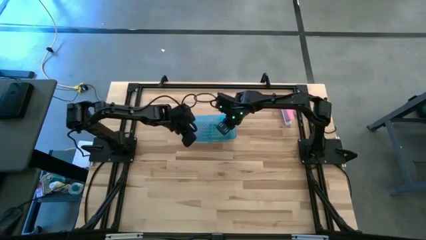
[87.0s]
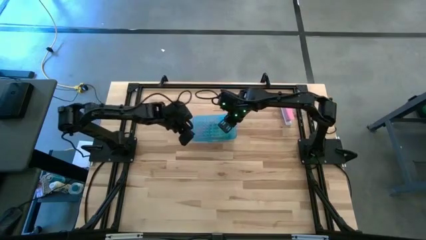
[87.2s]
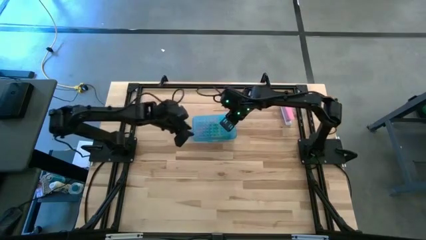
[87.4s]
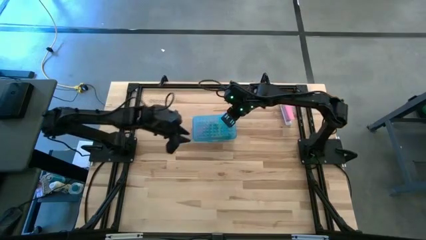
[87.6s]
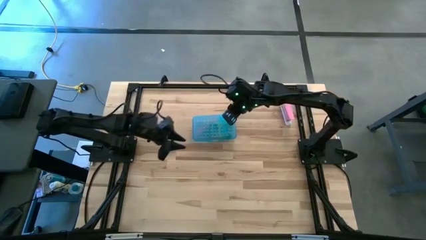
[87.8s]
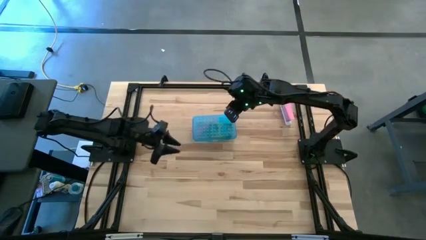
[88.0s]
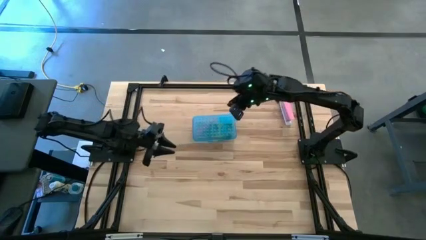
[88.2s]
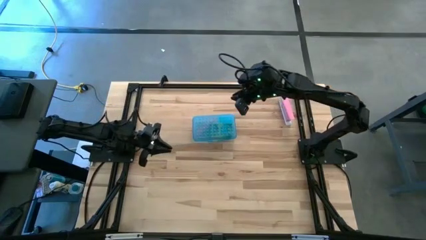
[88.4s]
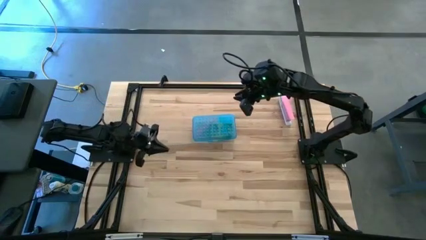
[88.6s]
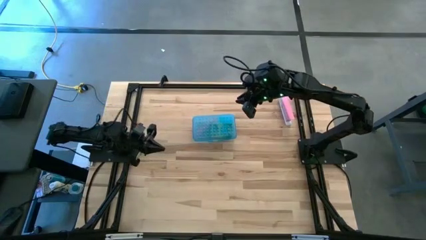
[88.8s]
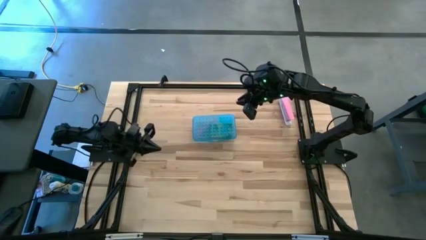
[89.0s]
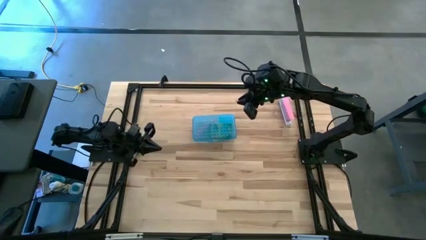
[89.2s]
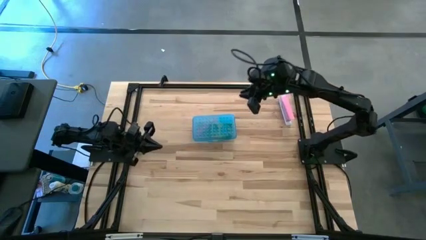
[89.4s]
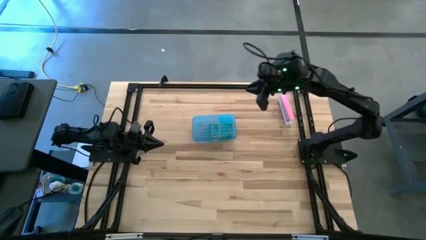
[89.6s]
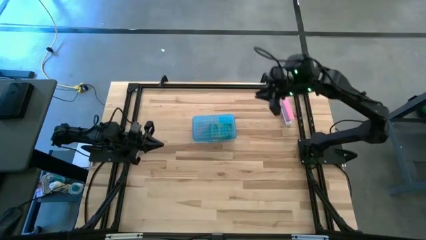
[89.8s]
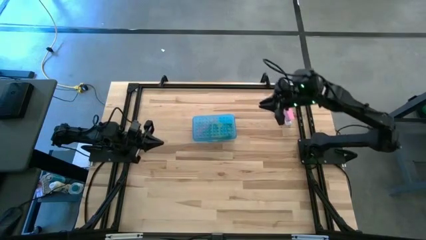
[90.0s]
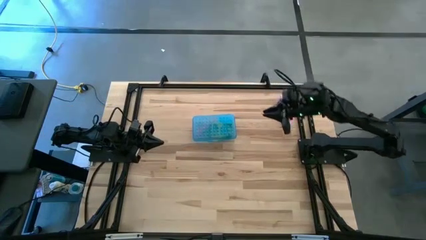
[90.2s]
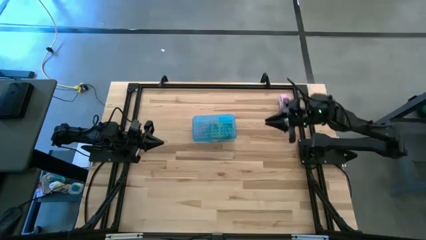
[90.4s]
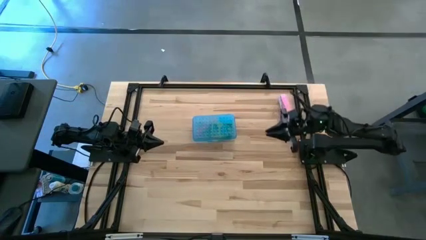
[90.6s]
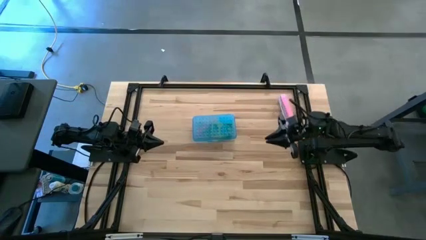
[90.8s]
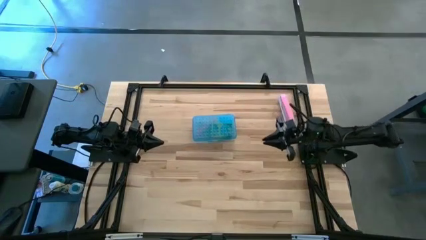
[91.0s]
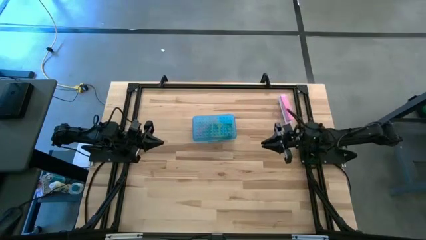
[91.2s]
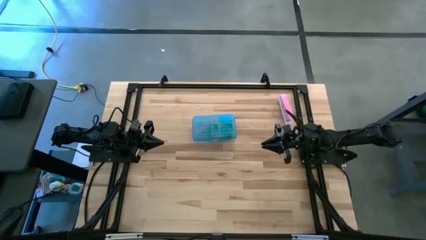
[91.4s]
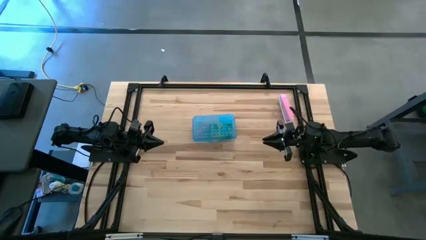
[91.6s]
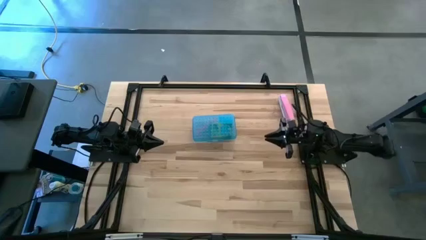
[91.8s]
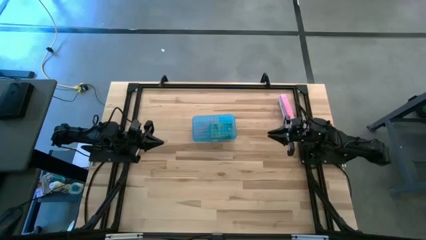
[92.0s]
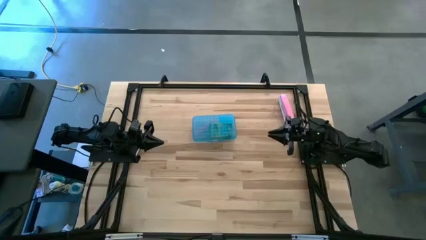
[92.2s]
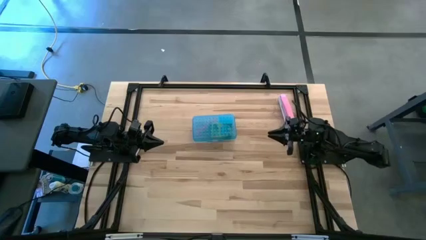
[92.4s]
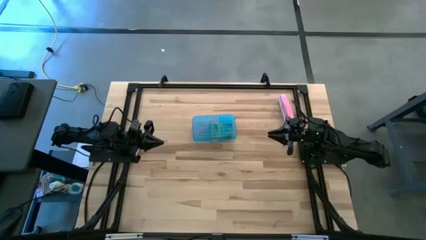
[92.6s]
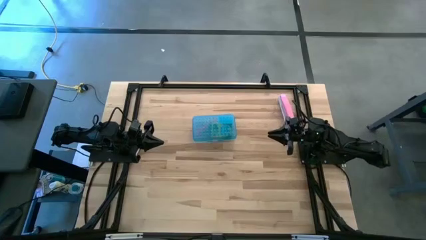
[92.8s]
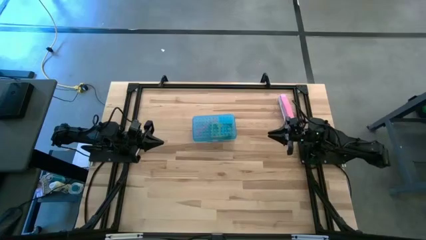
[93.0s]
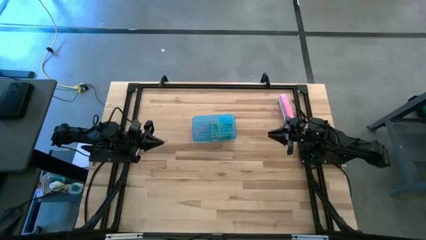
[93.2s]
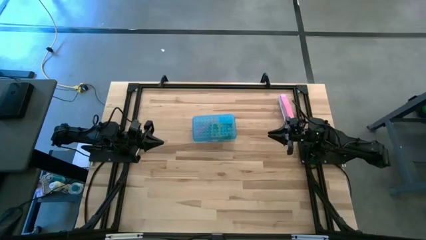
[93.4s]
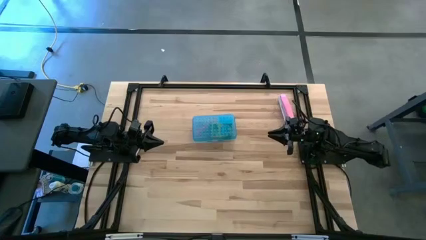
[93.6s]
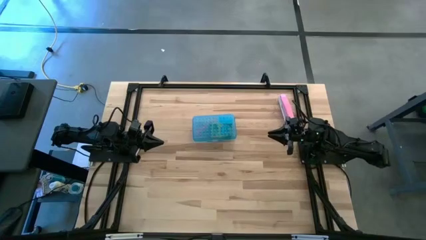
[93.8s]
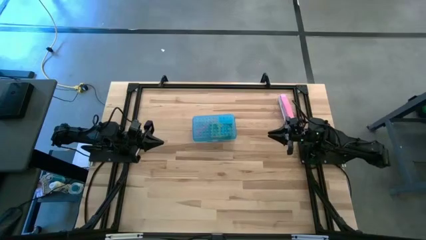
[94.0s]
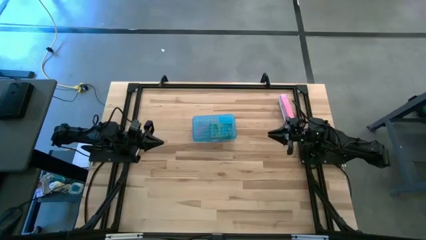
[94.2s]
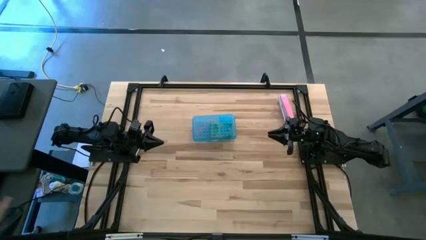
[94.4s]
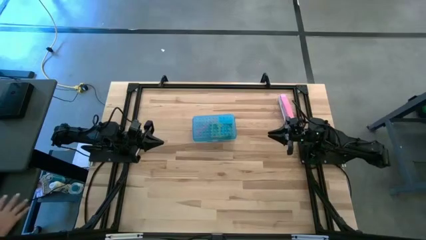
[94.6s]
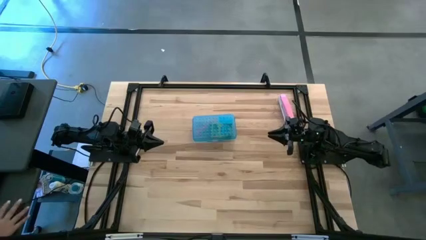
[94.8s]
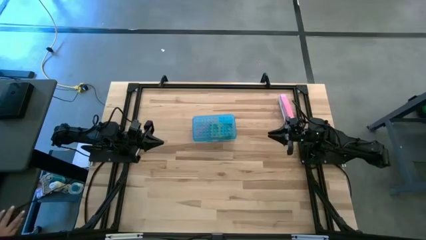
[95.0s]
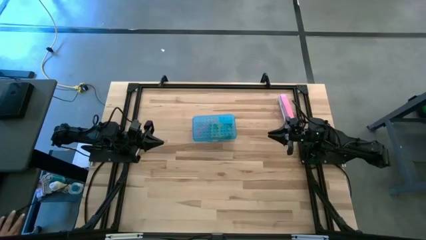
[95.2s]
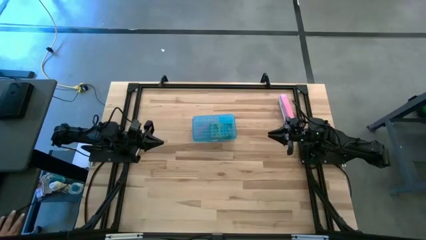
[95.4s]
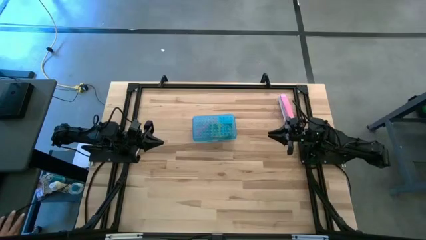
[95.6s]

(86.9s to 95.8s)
Task: Pack school essentials
Return to Home Position

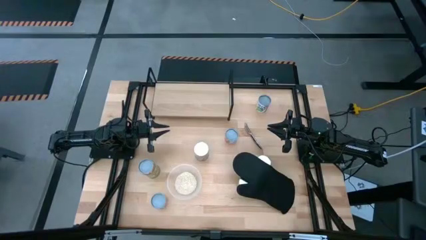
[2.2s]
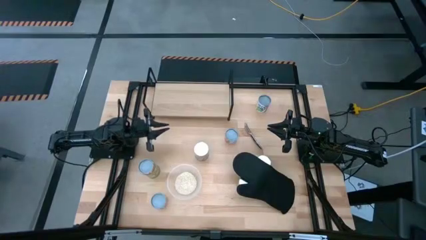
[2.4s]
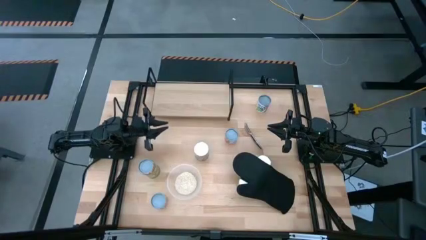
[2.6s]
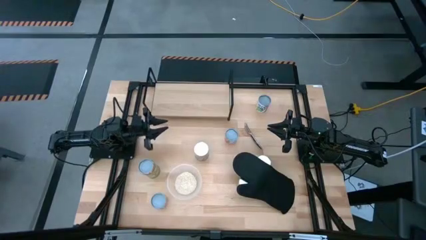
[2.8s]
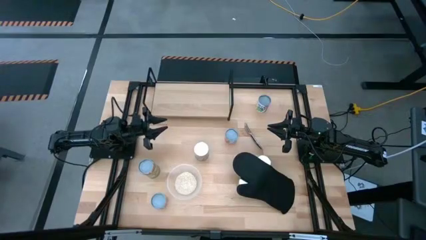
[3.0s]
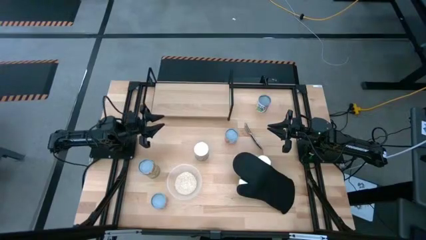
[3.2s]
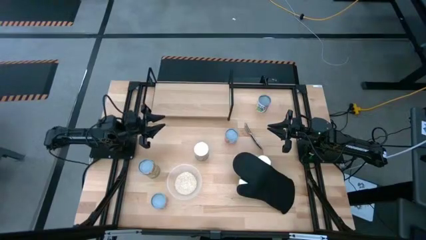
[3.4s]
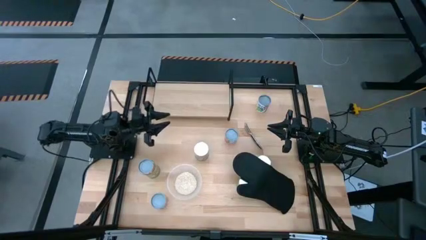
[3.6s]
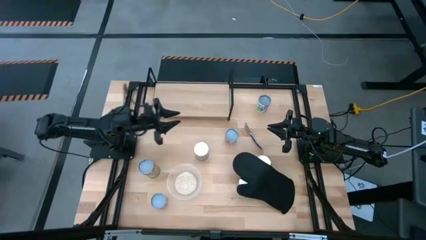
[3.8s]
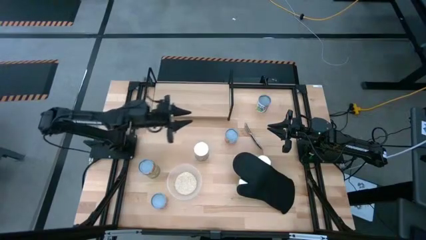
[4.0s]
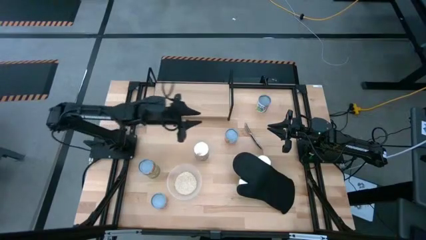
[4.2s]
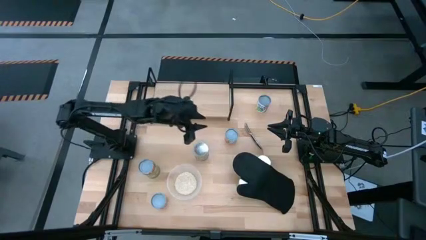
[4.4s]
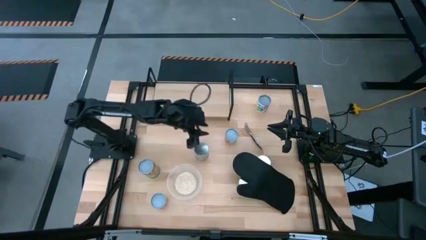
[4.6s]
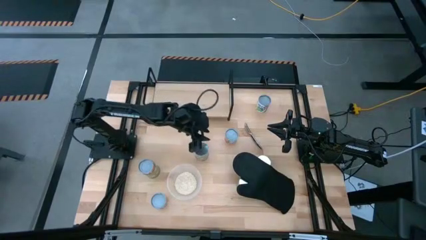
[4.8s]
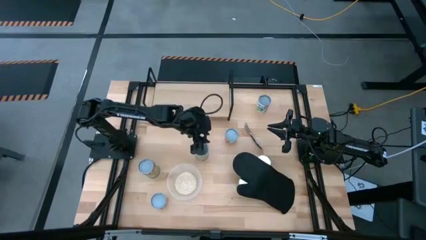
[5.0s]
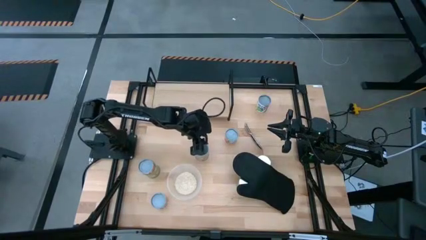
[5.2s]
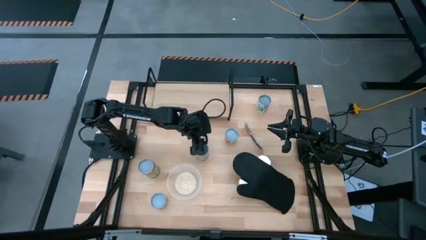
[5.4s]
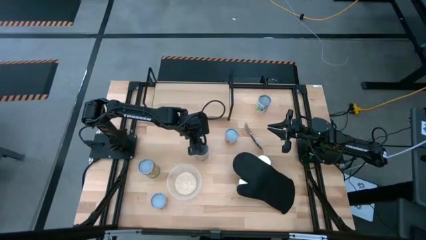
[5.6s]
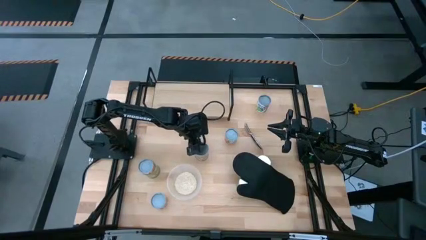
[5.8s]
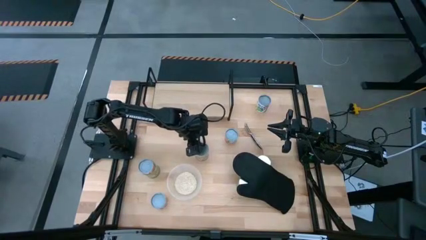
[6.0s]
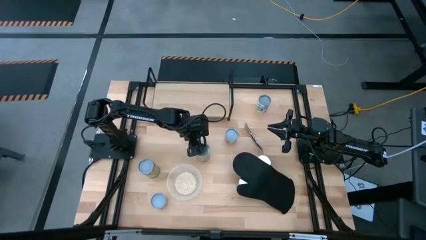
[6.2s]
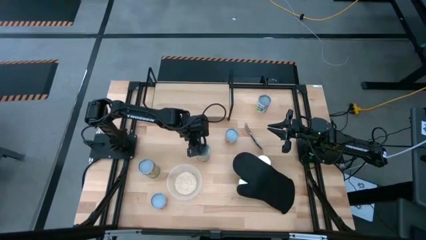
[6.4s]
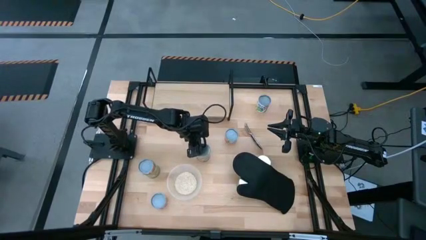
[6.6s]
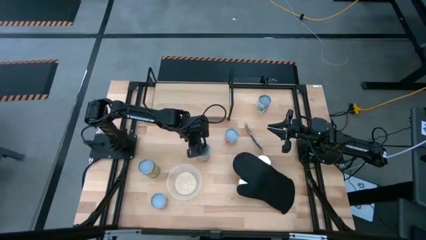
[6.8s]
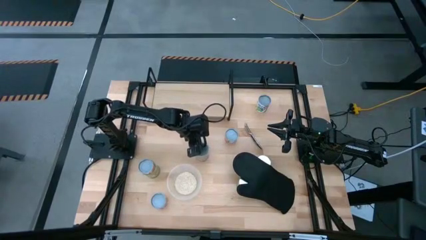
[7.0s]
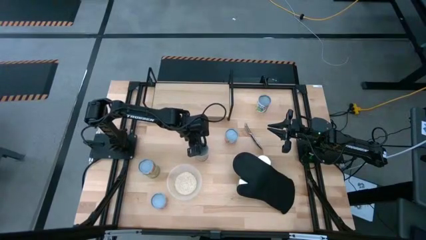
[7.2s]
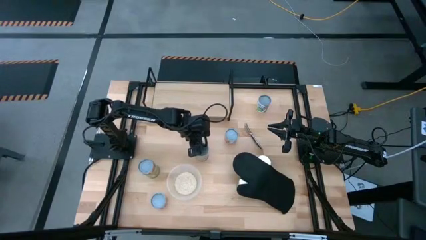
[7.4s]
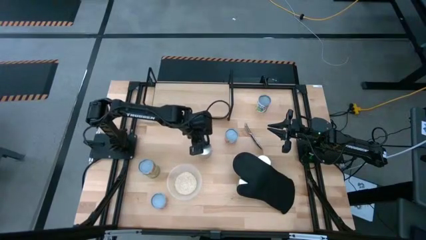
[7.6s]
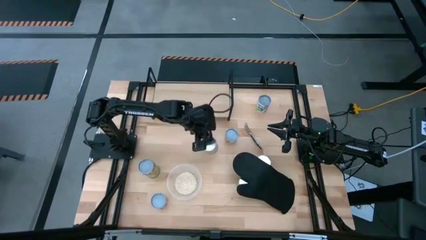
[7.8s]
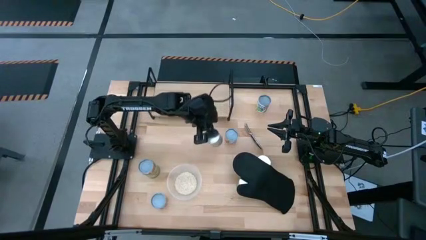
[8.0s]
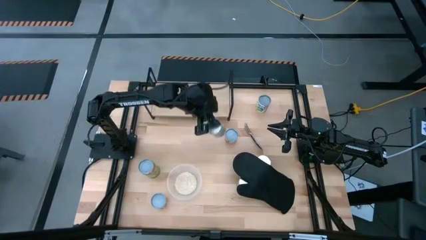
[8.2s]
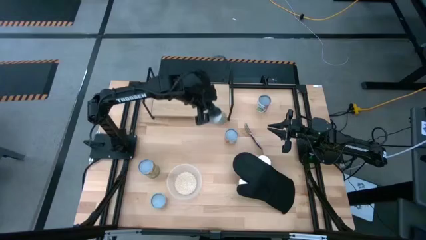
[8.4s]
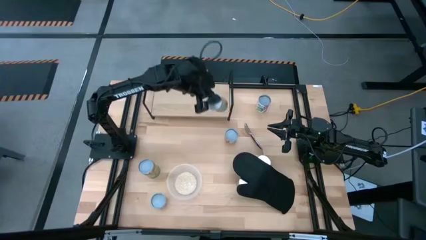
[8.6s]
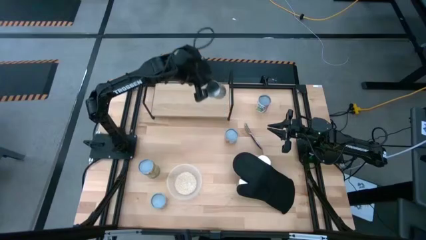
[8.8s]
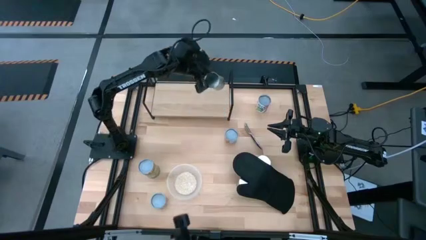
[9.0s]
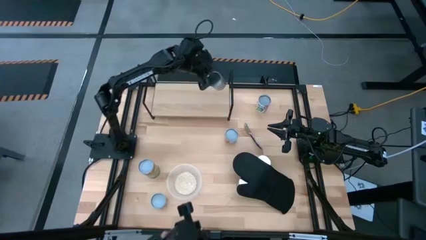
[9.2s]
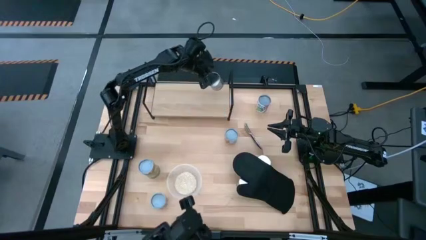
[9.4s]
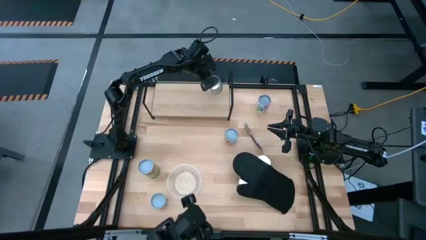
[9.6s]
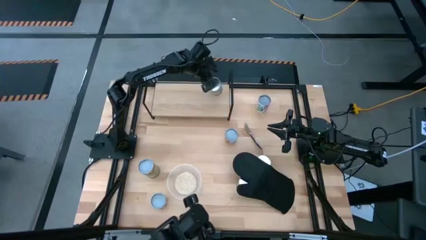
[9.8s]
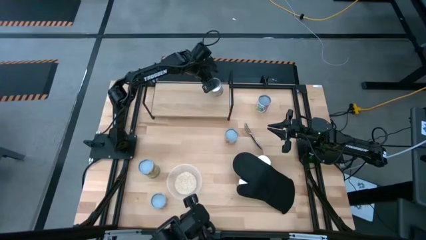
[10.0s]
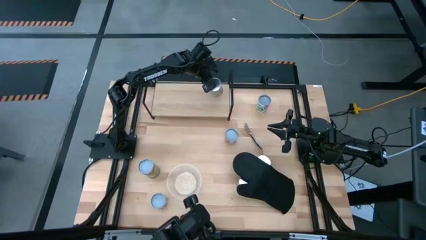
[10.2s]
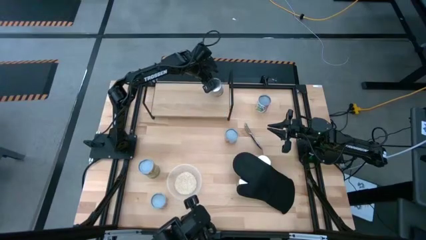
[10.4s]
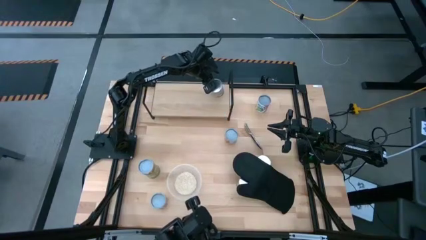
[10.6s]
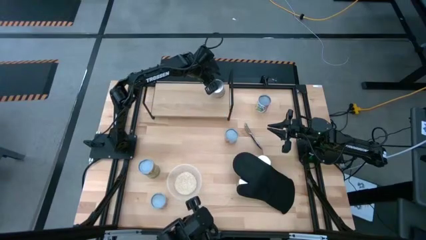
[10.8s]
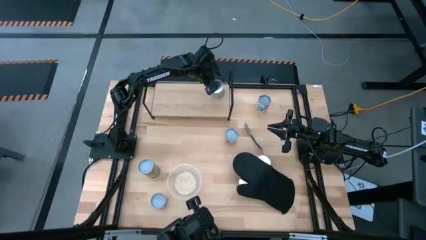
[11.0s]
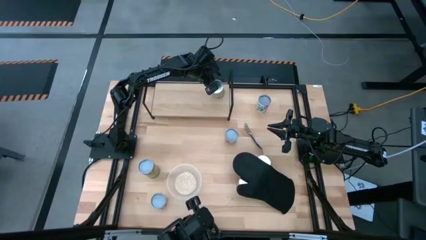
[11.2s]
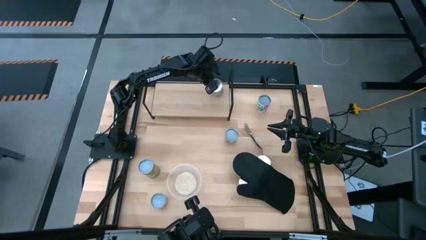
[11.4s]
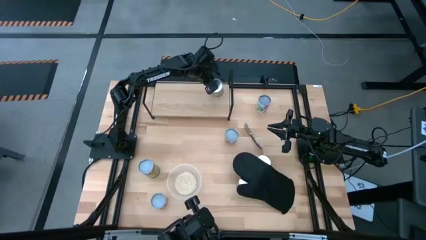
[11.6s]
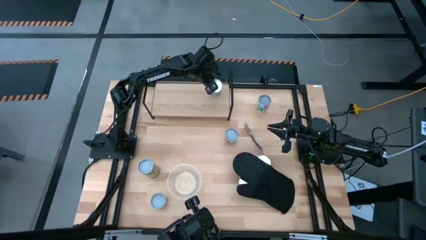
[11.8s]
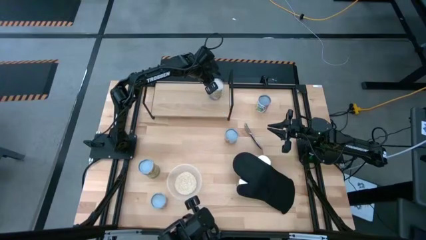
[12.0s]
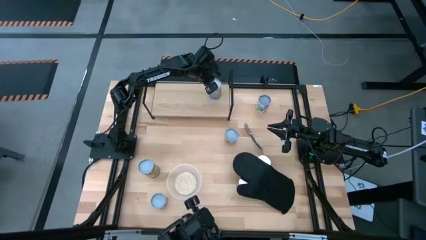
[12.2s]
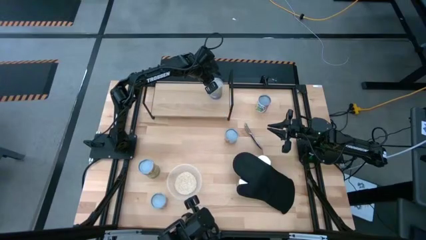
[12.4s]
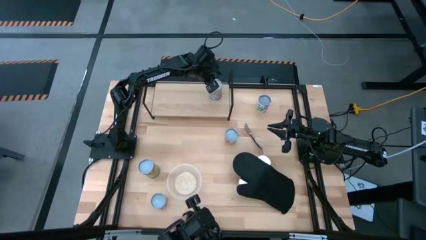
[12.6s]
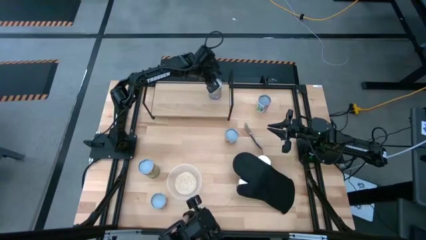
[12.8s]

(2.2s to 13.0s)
Task: Pick and place cans onto a shelf
Put the canned peaches on the shelf
